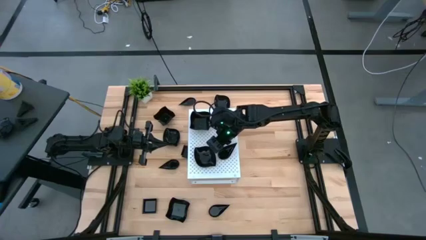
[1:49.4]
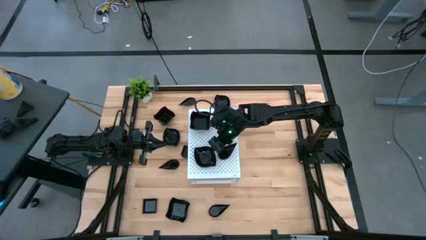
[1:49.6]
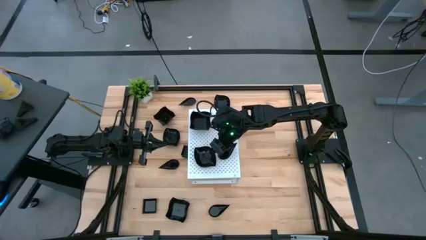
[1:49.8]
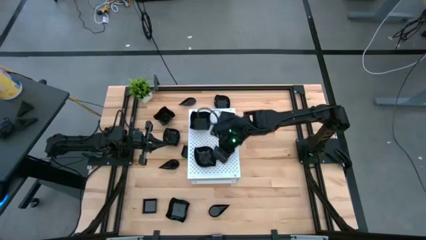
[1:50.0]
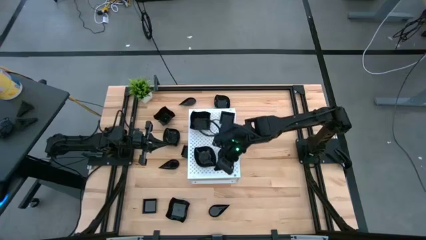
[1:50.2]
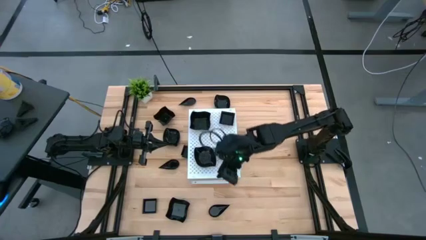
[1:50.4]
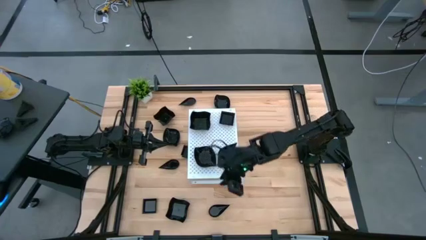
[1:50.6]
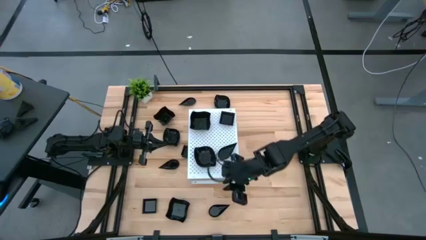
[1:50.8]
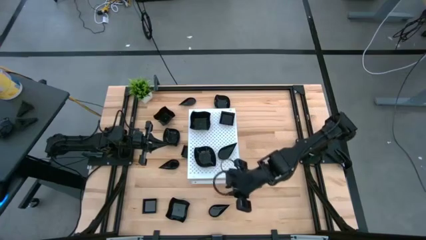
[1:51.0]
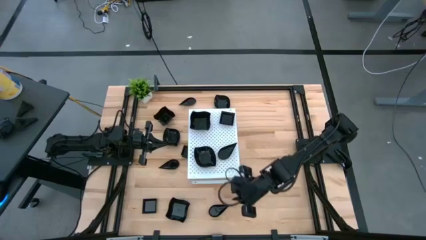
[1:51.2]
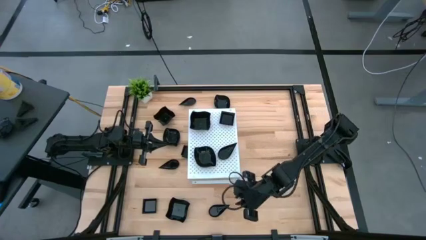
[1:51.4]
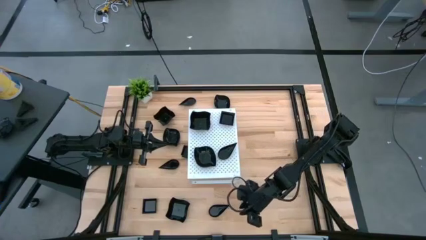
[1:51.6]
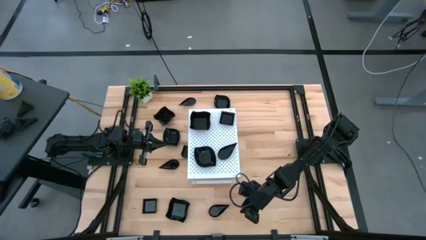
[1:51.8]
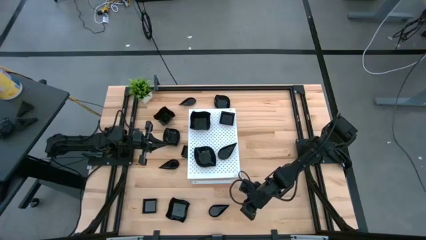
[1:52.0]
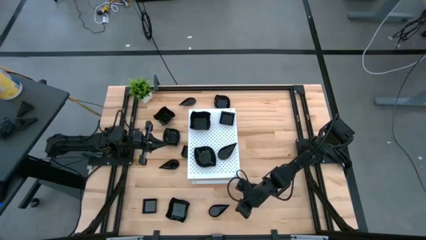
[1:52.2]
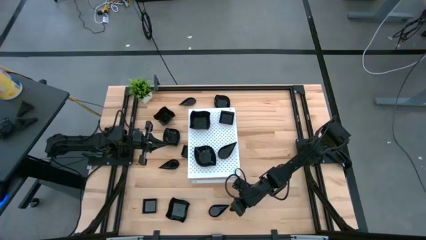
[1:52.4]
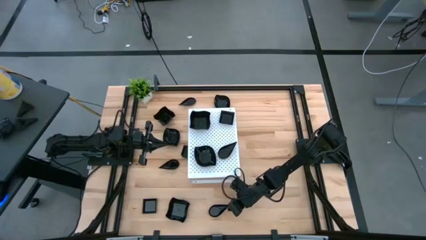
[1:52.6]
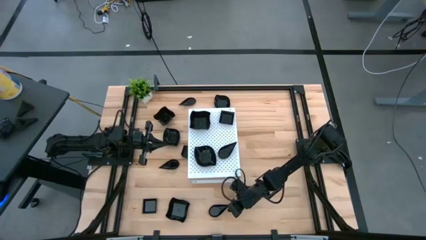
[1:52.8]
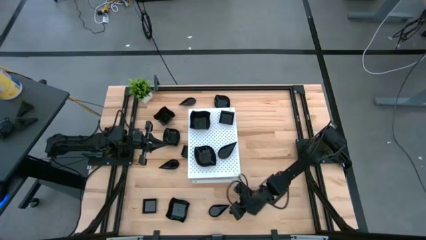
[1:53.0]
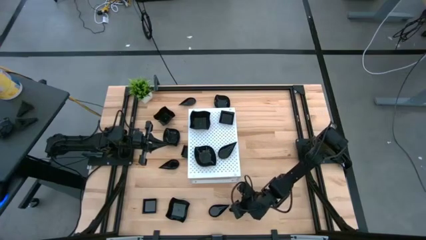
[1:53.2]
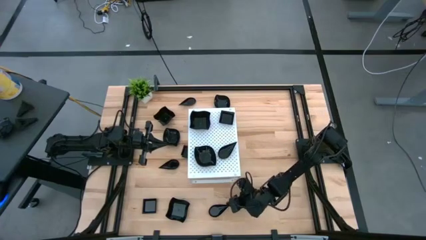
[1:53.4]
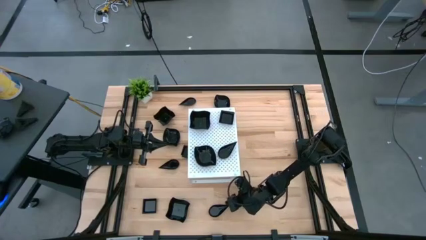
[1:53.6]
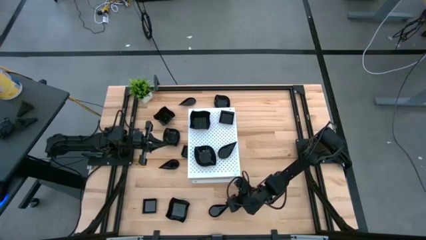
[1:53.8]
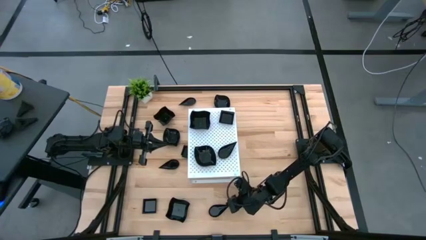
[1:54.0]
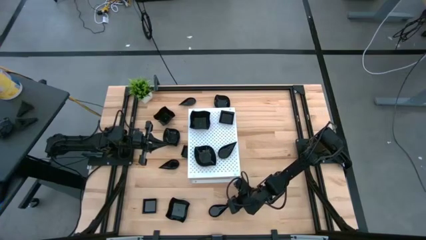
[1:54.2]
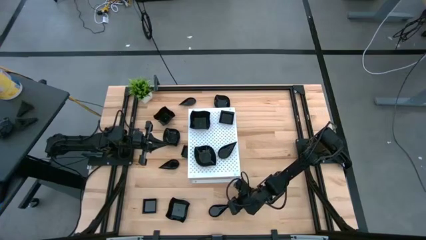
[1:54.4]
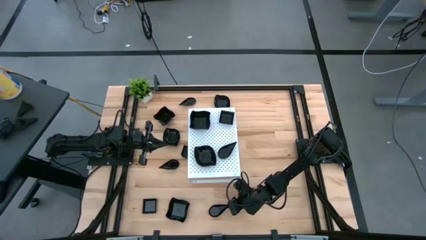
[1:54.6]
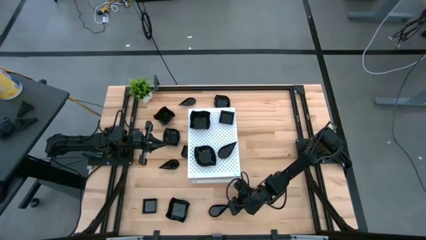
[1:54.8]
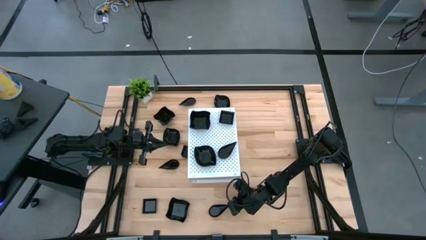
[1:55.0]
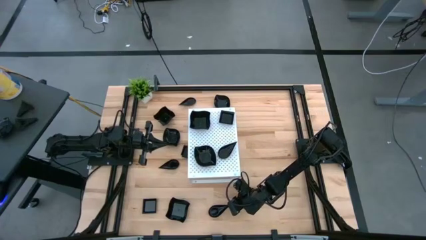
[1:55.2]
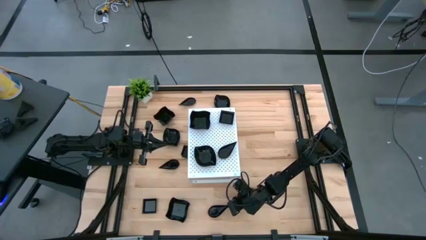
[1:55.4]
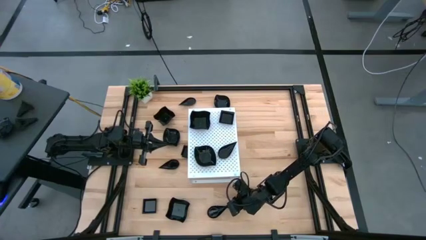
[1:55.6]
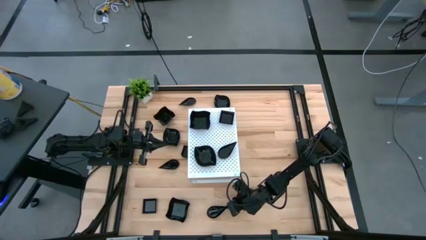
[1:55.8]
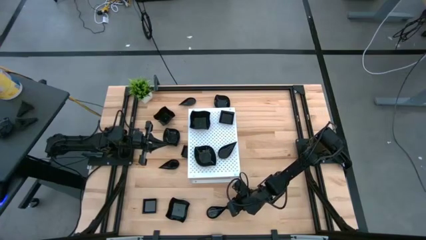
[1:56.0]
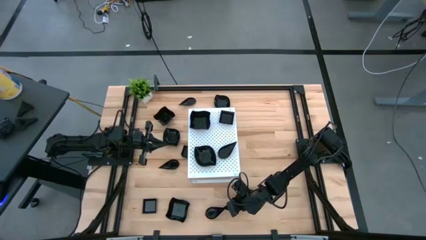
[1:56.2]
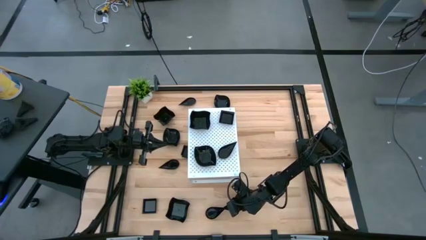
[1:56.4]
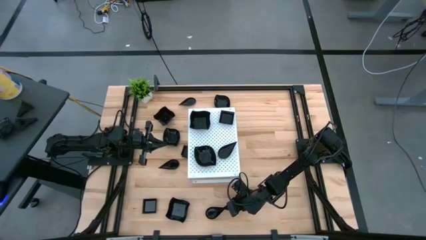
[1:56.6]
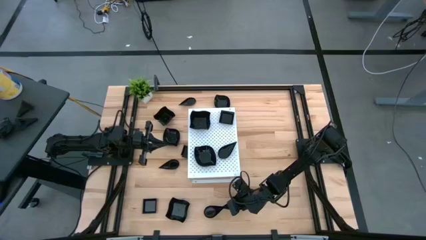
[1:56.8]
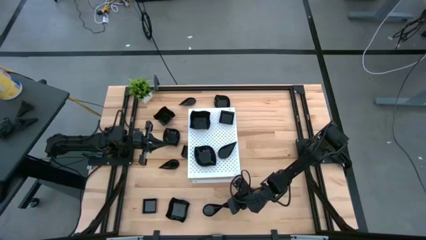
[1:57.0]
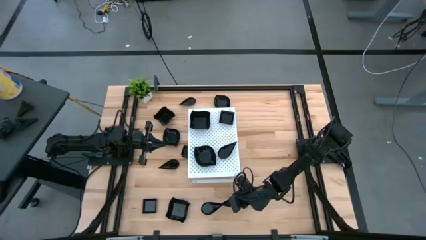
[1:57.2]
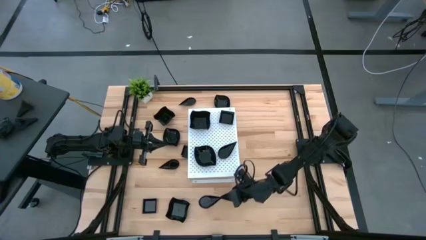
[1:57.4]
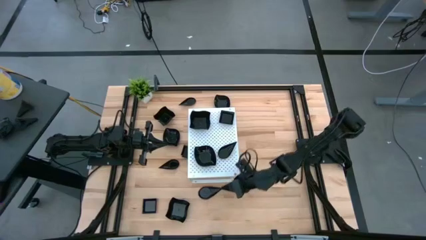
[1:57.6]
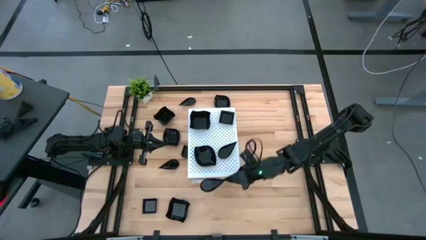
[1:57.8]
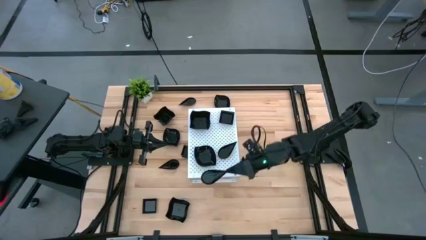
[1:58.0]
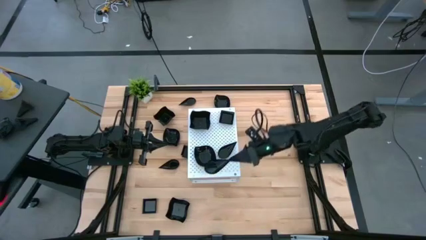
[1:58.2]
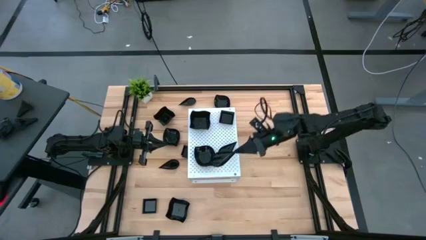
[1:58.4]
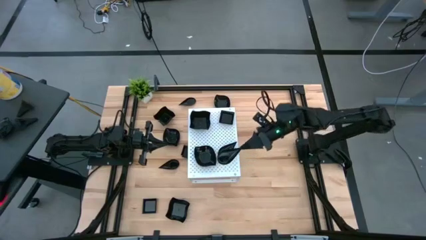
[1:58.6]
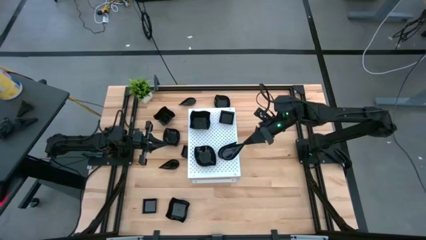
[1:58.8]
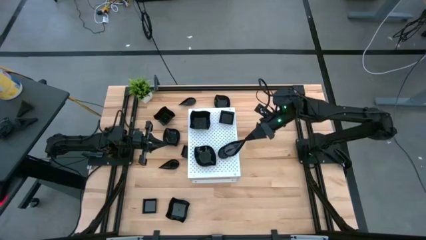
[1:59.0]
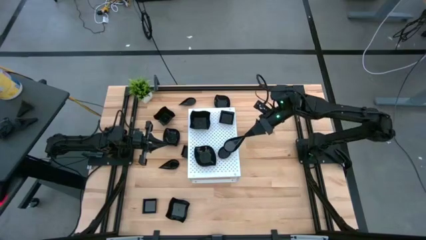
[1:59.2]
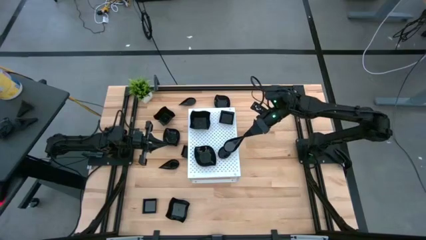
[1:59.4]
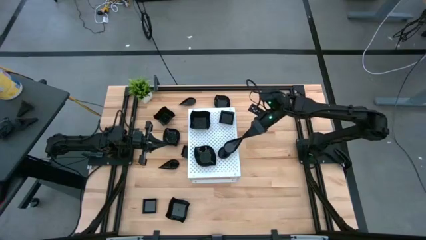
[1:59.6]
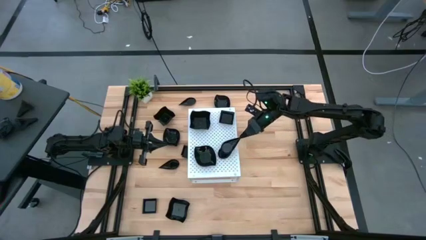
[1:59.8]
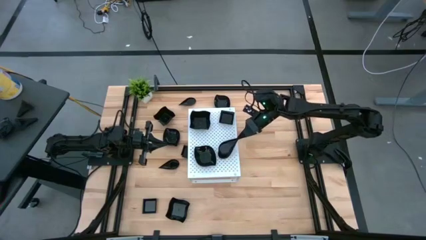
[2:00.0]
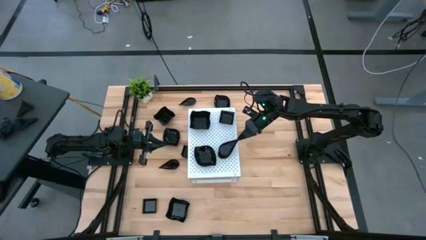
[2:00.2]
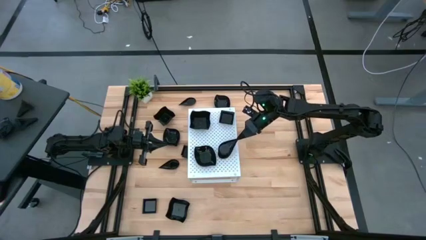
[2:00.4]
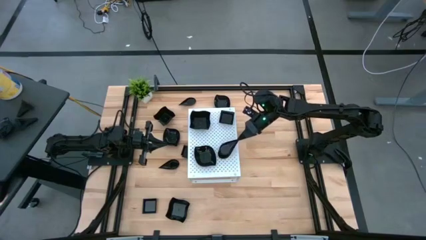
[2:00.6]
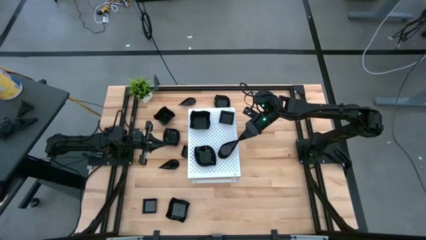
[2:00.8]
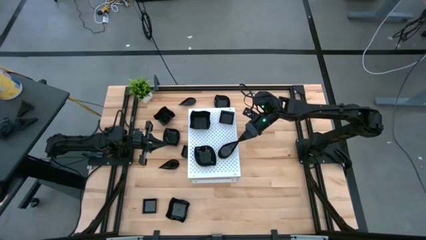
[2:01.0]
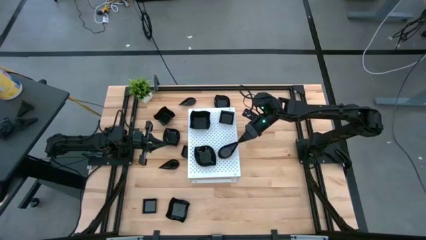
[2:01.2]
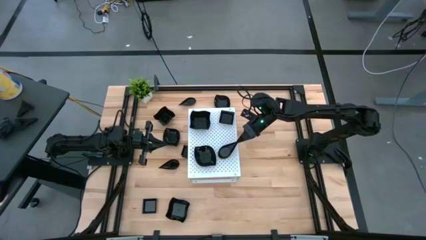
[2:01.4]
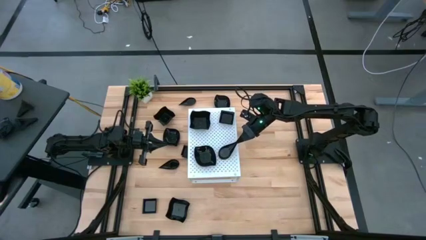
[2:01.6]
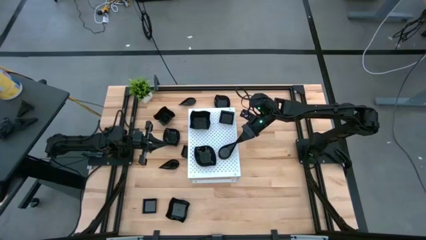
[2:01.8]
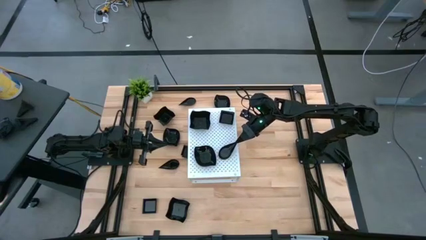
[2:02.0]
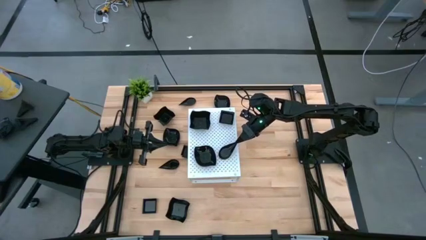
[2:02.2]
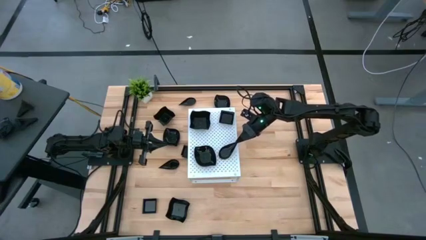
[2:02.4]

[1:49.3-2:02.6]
Task: Pick & Place Mini shaped plates
Stack the black drop shaped plate on top of the other black drop shaped plates on the shelf
